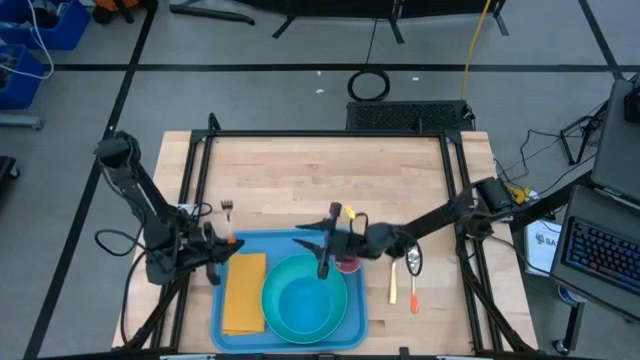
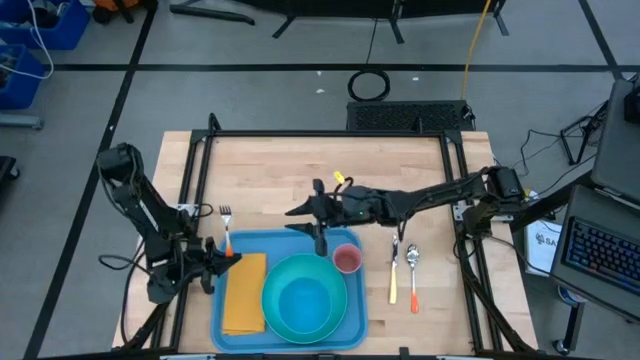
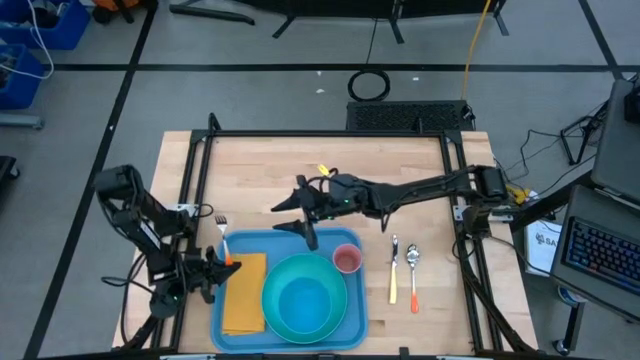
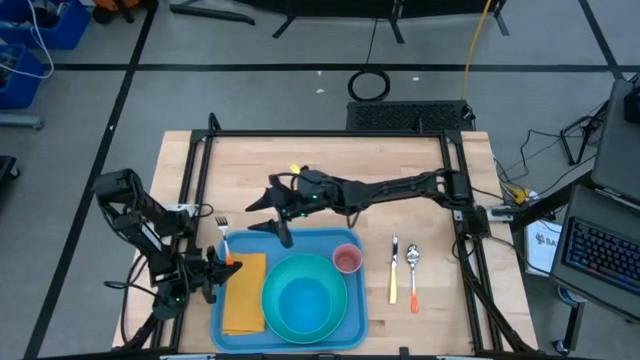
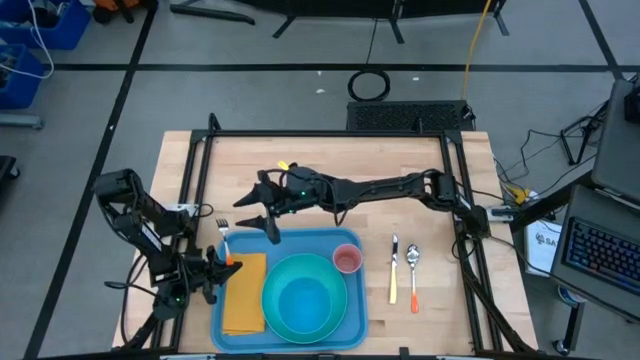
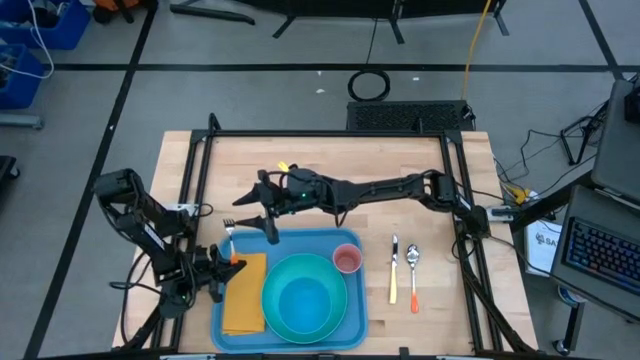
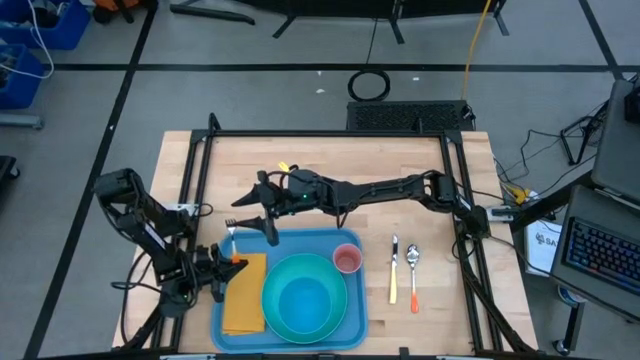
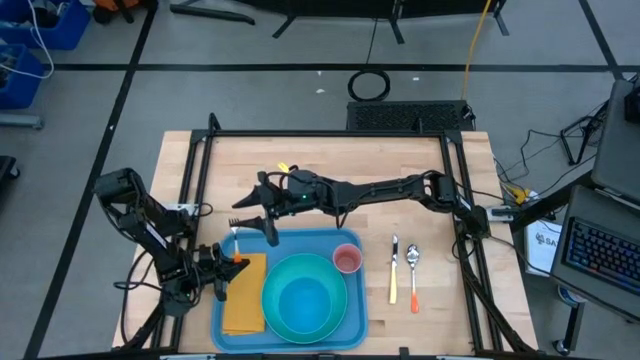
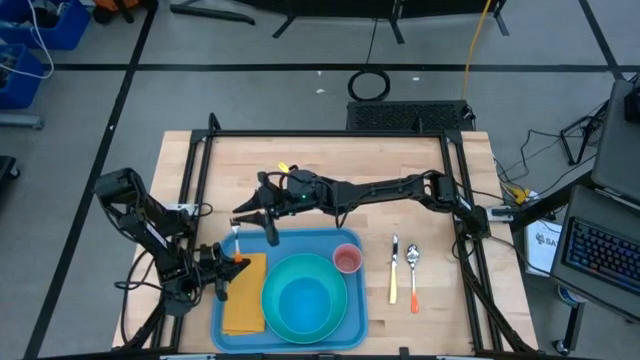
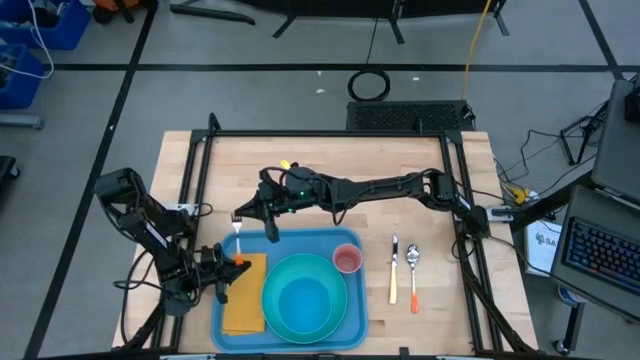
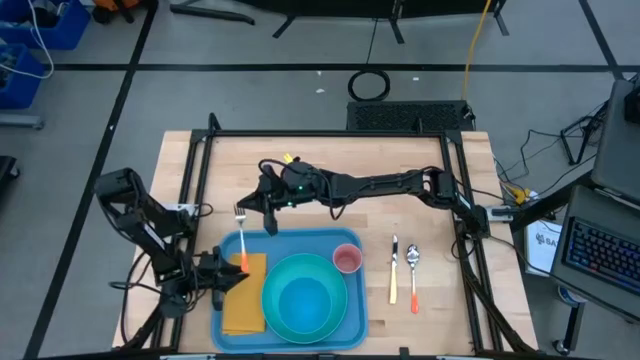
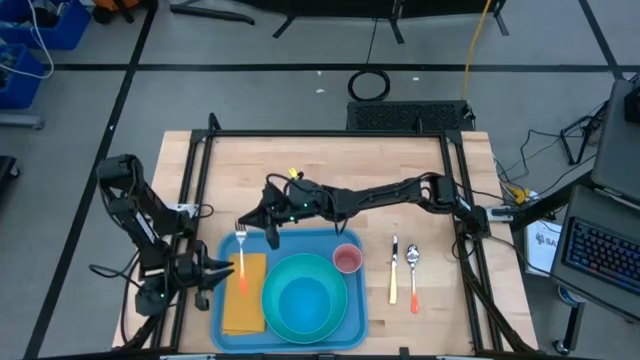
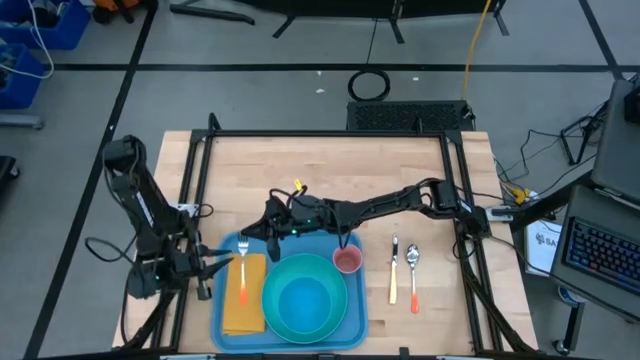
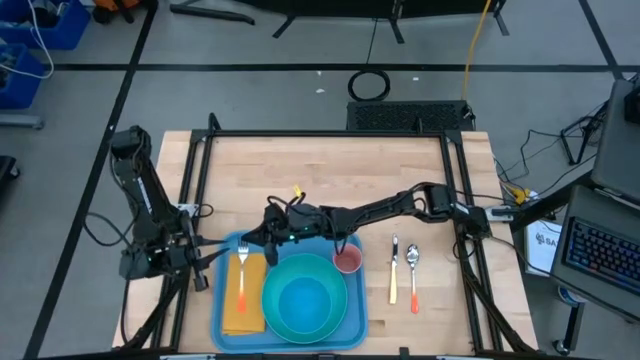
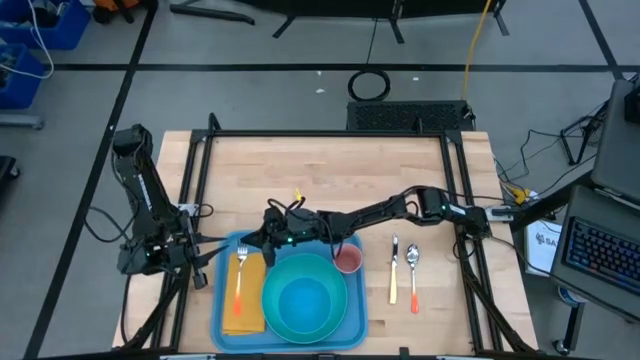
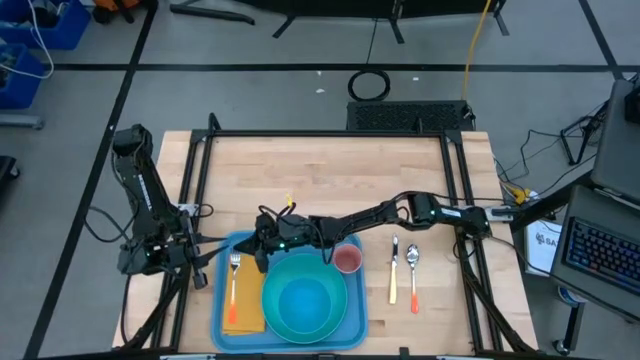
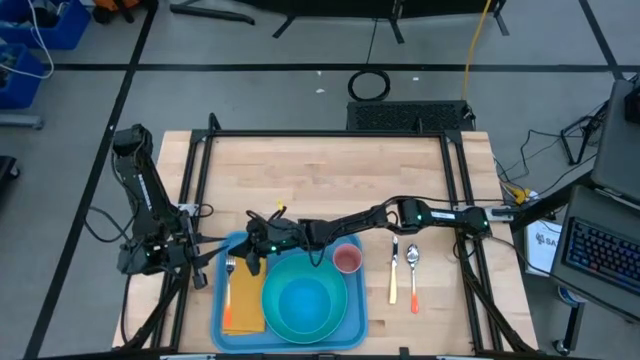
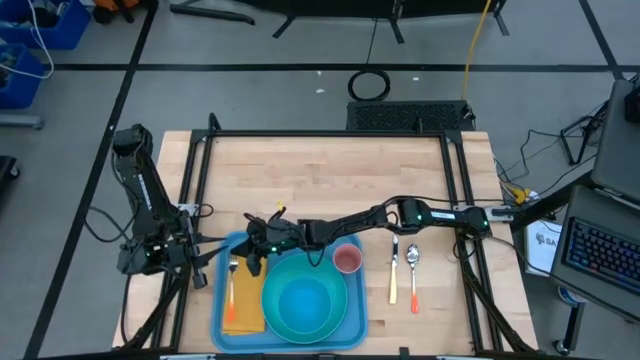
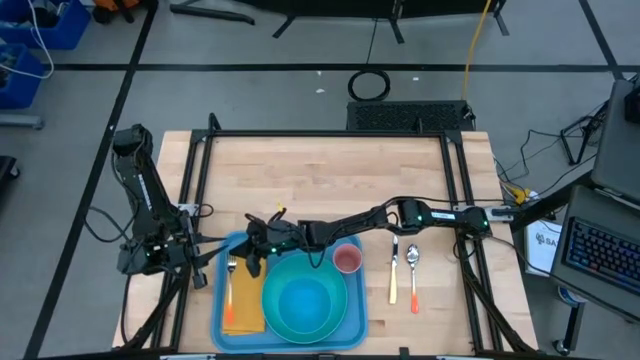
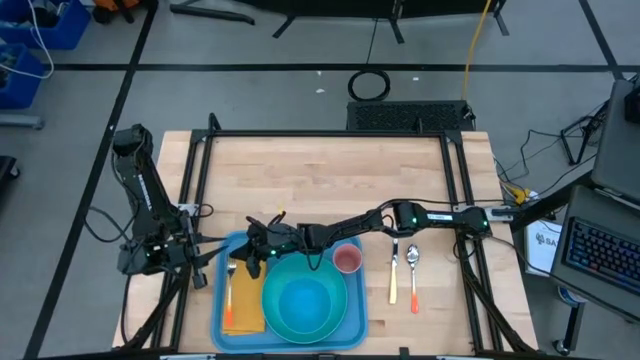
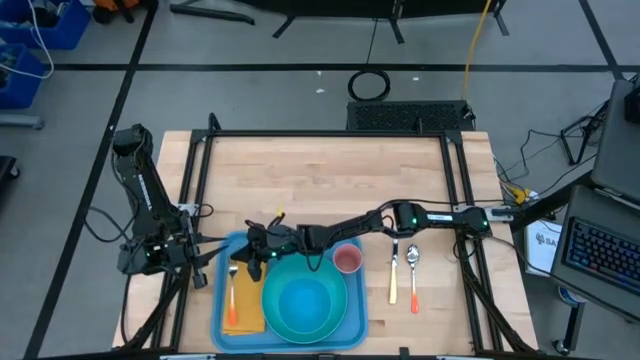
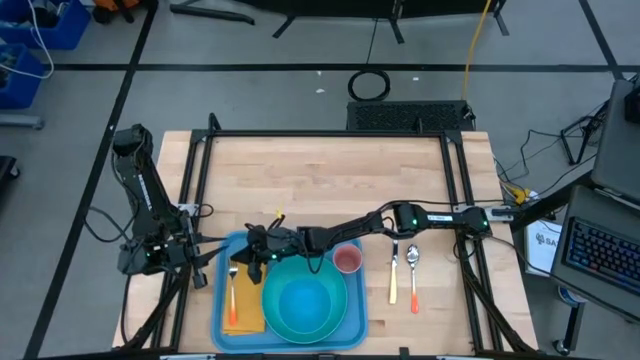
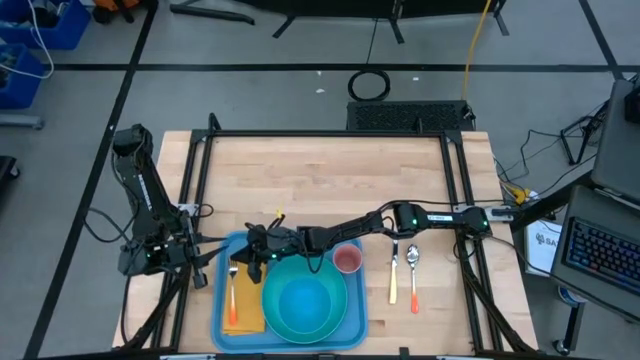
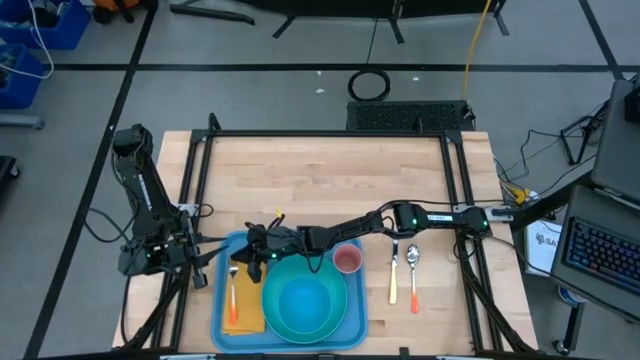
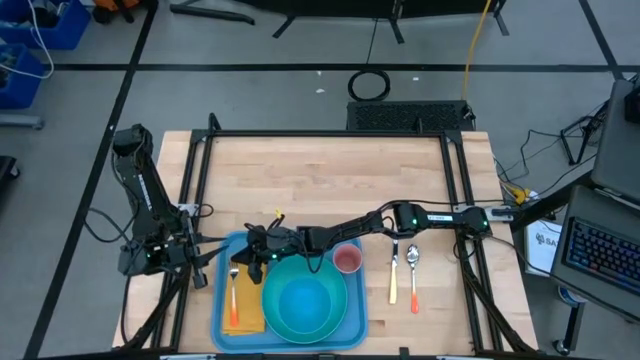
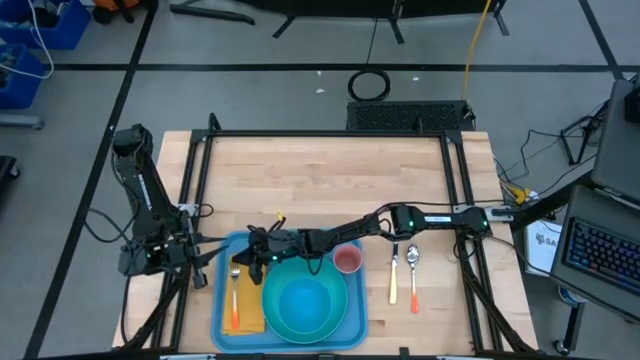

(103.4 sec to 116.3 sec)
Task: Set up tray
Put the orange fork on the yellow table napkin
